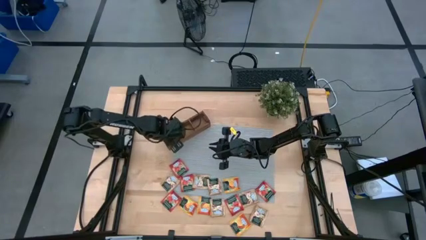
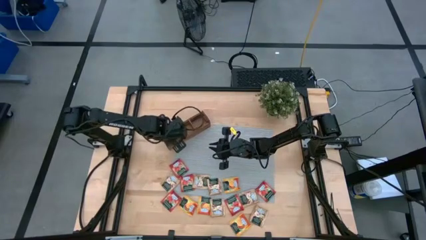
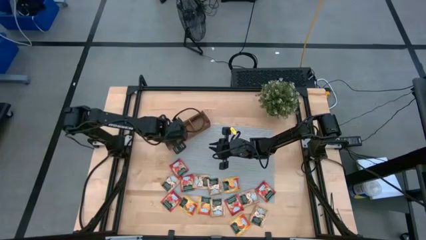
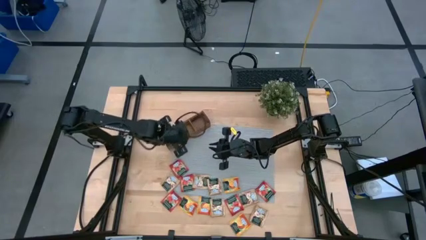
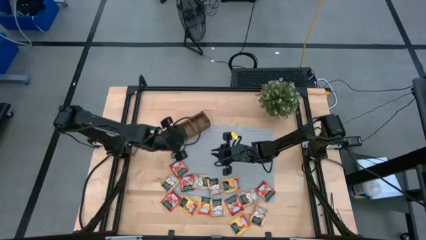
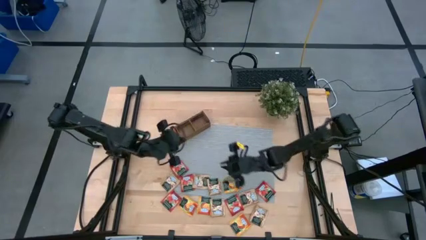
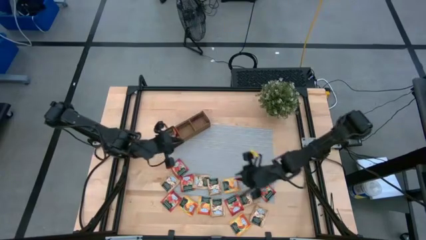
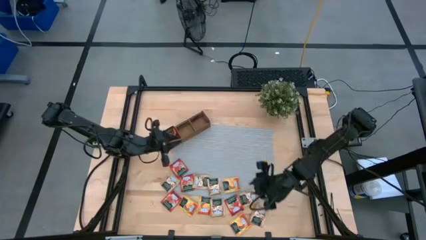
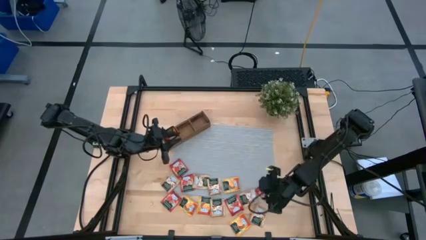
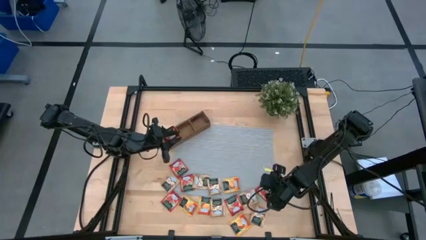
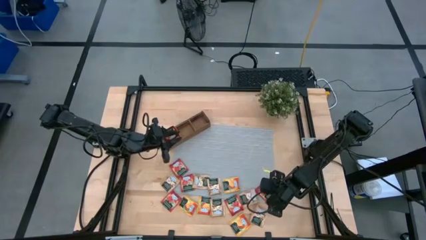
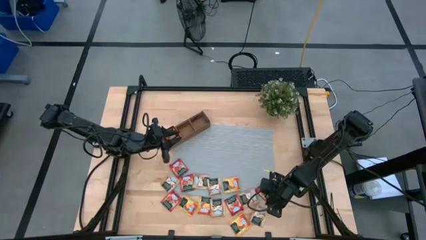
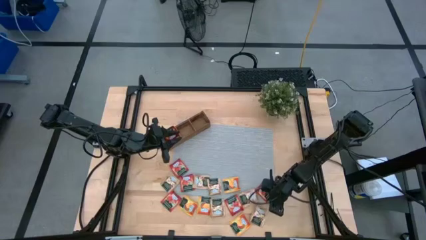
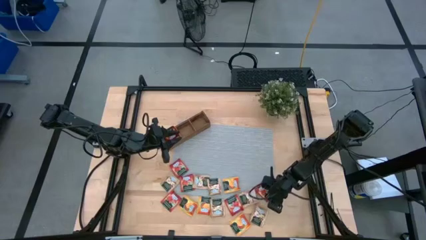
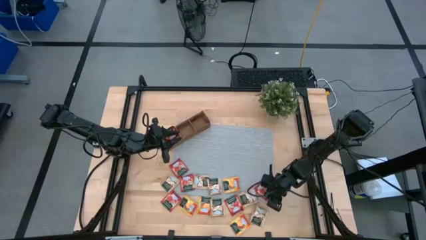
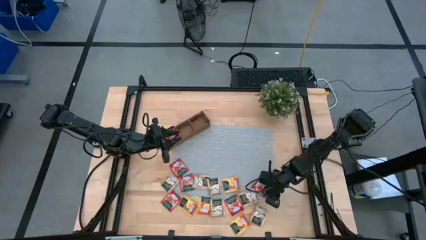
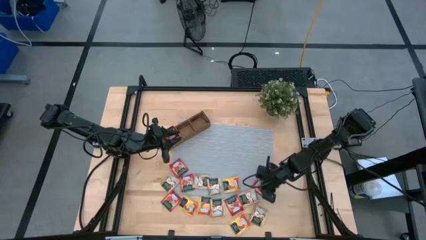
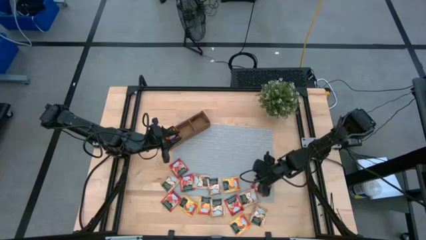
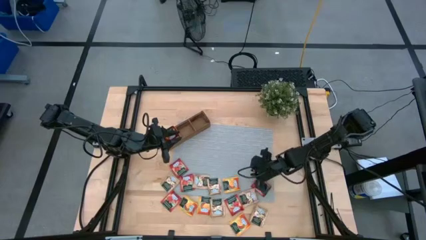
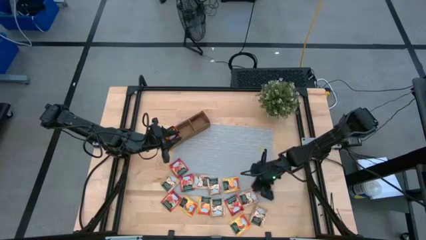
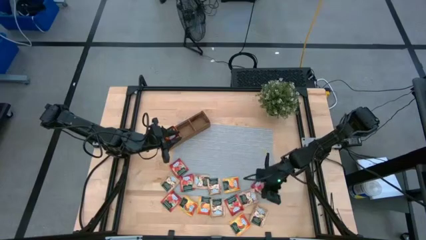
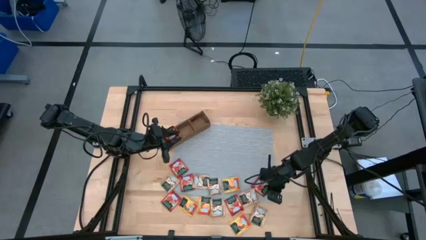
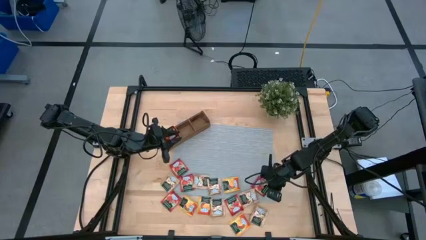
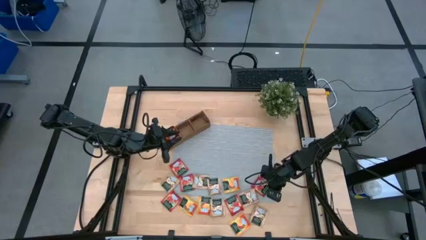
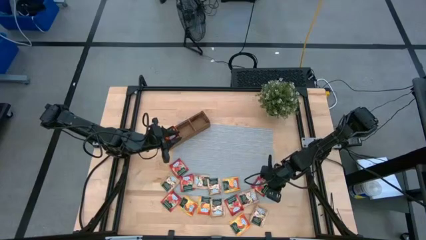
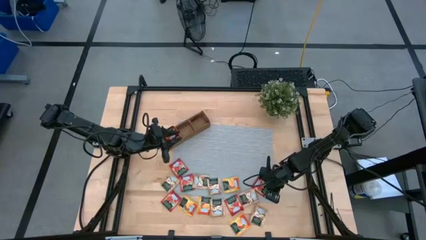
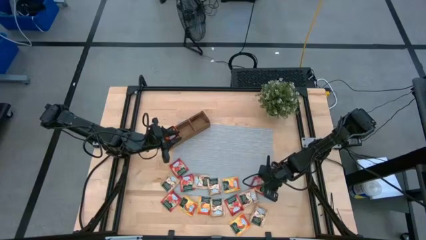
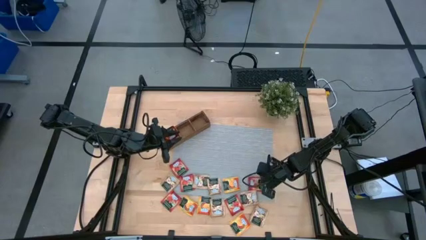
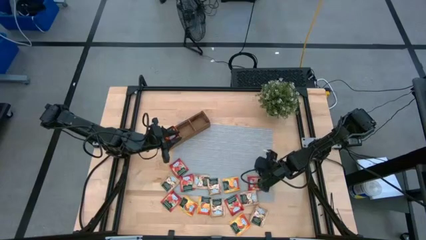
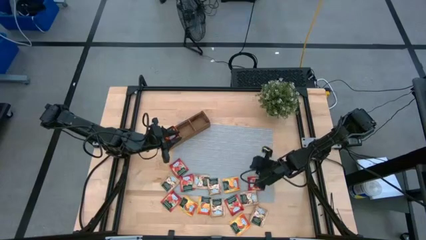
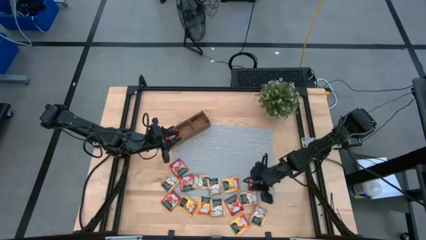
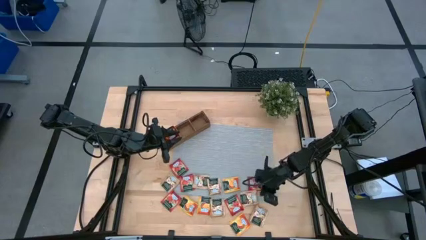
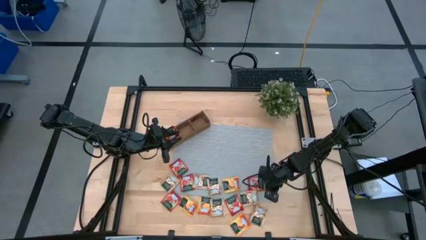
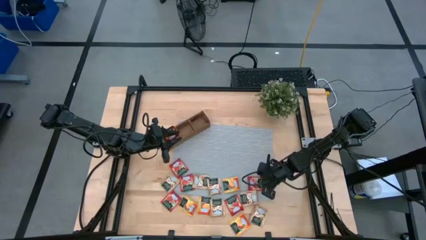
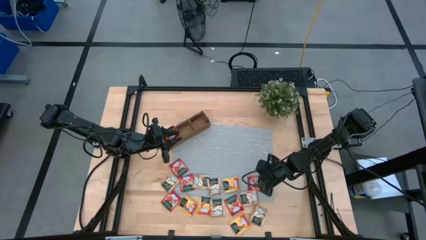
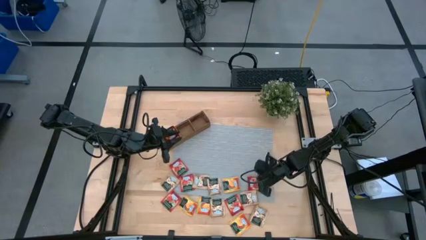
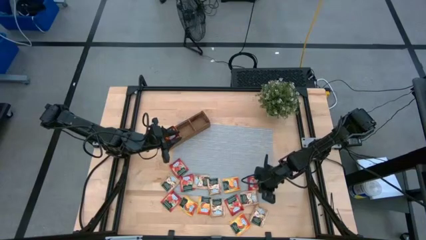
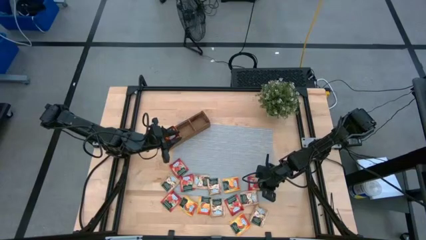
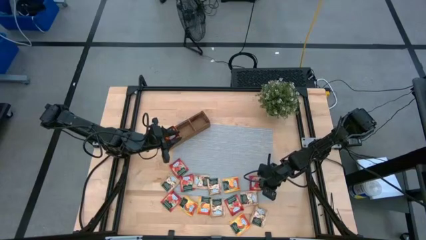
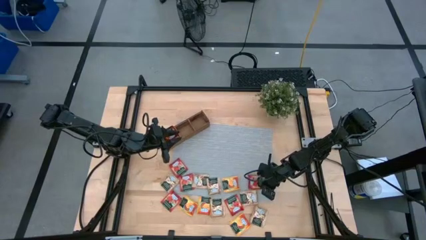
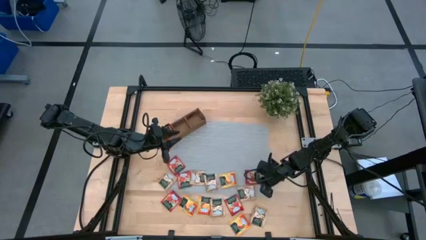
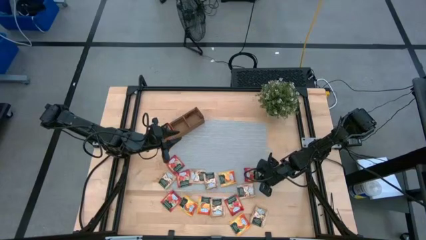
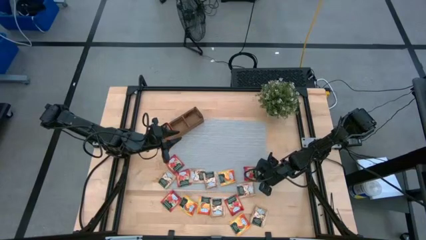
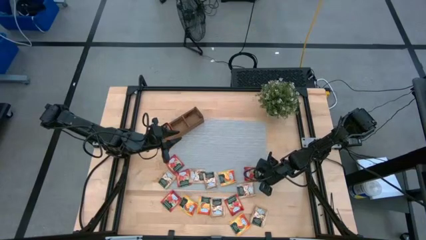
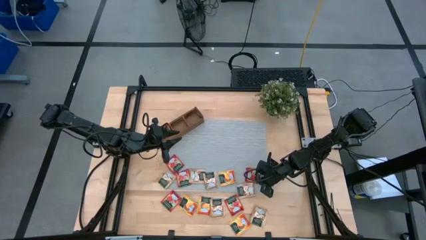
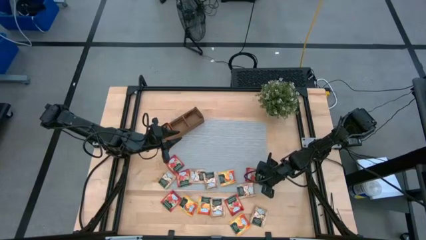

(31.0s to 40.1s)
Task: Pick & Place Tea
Adjust the red tea bag on the table

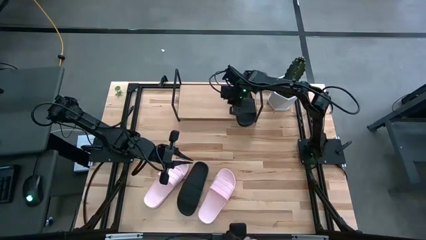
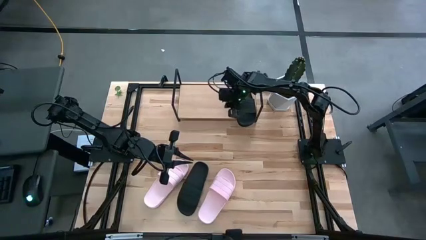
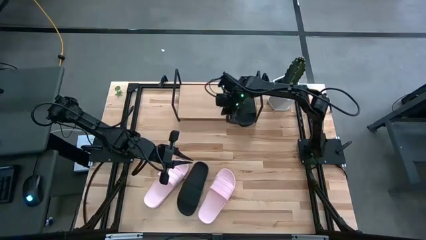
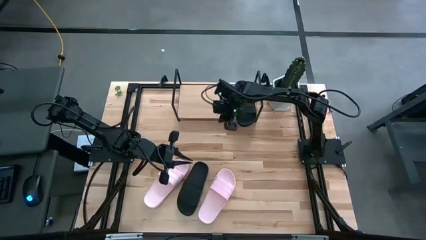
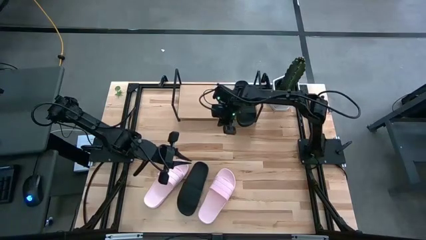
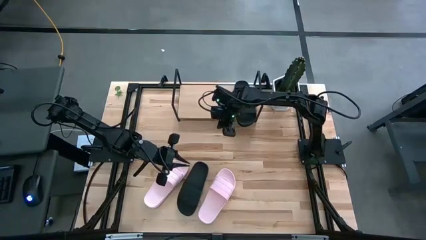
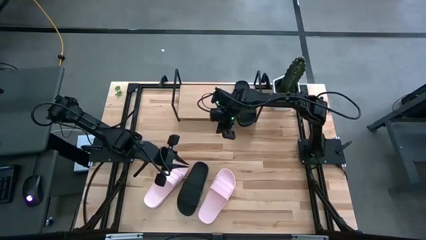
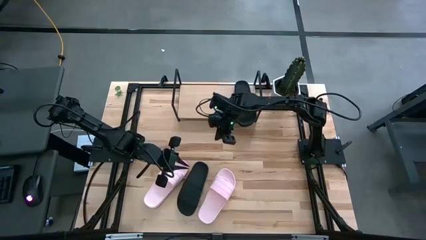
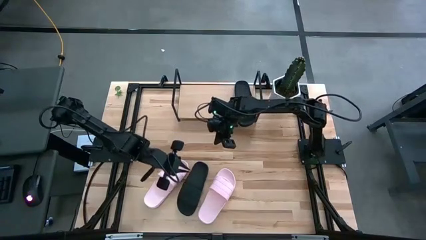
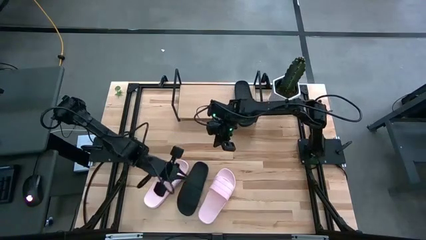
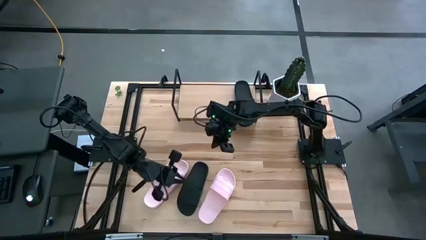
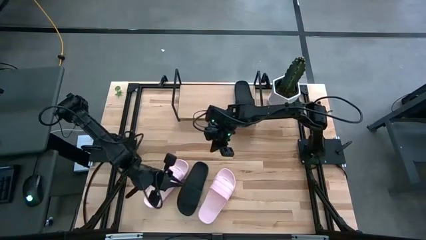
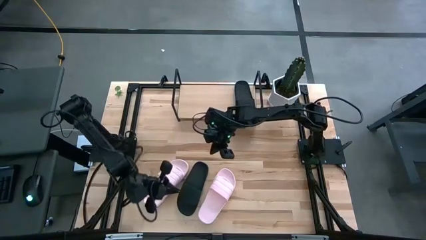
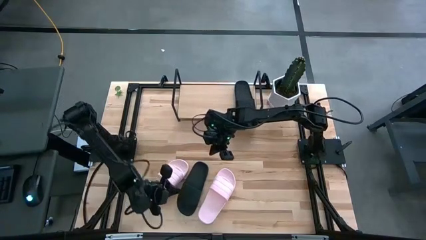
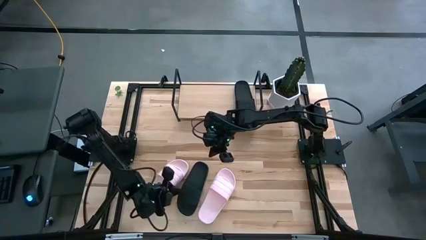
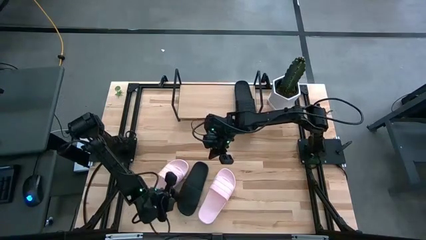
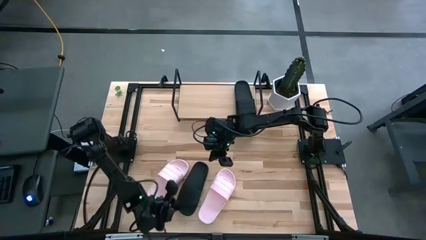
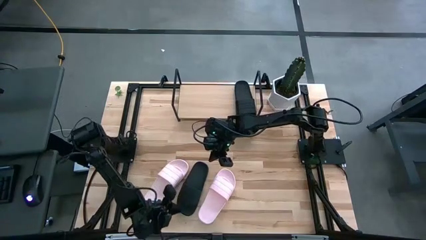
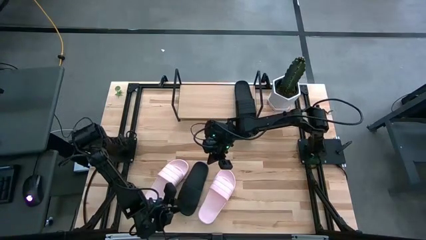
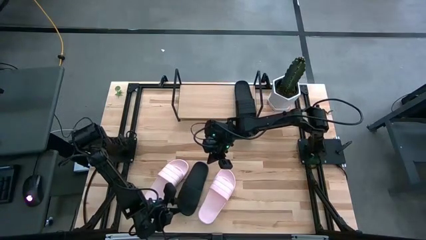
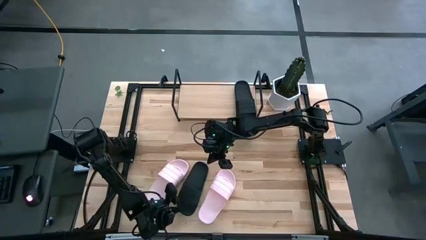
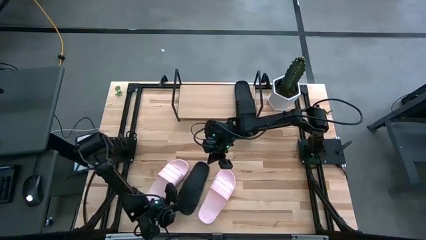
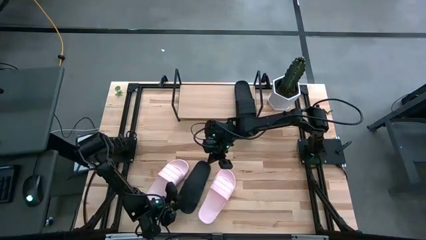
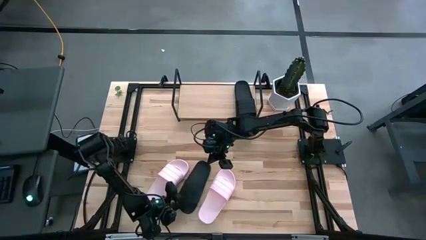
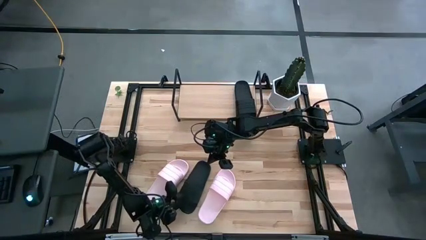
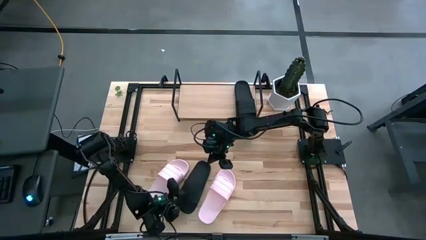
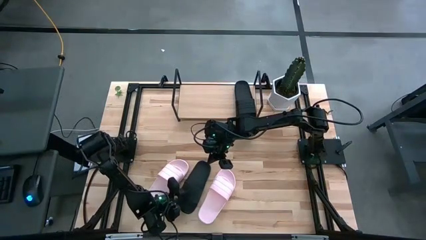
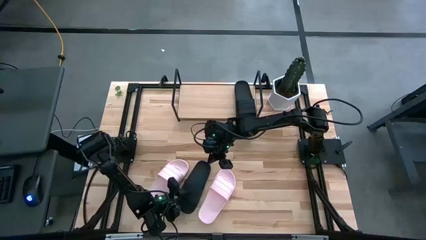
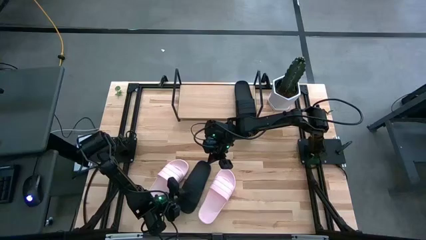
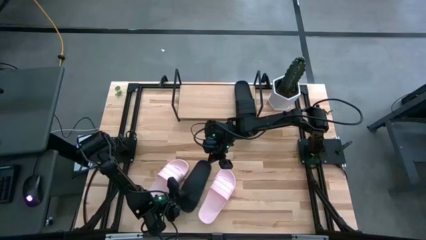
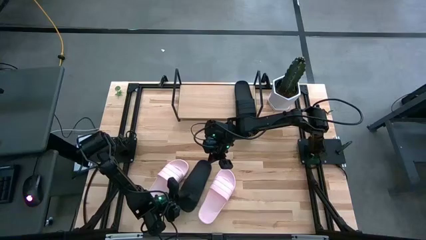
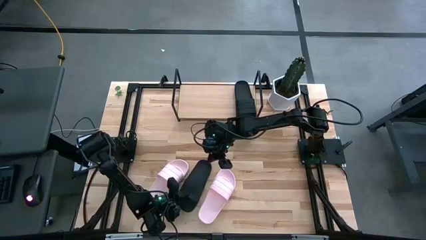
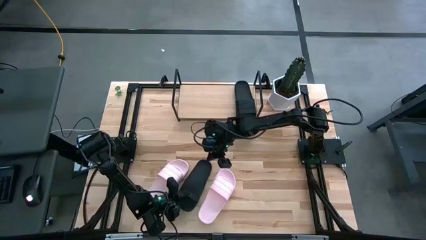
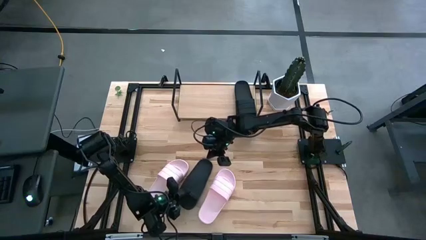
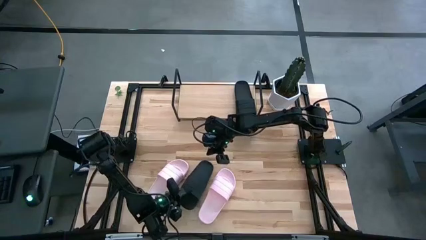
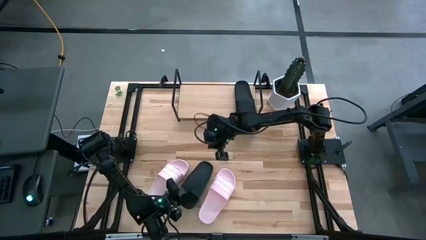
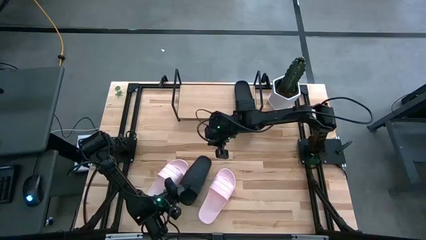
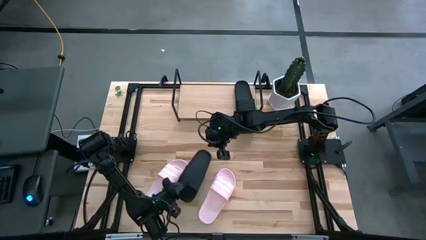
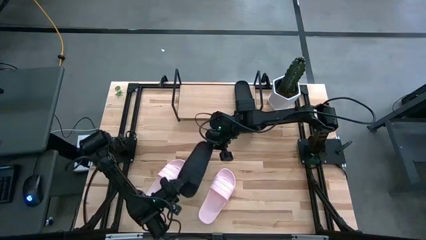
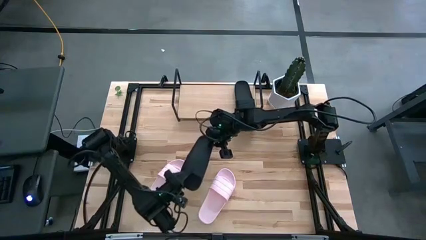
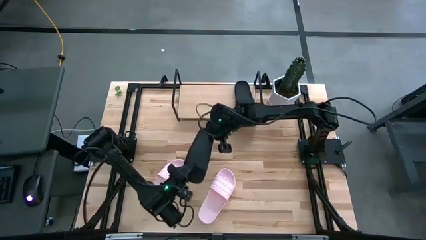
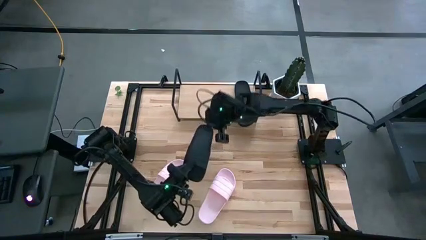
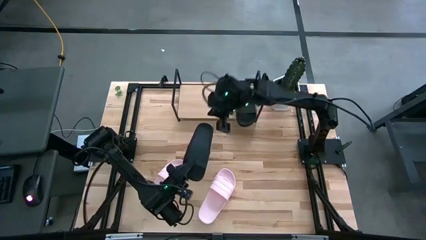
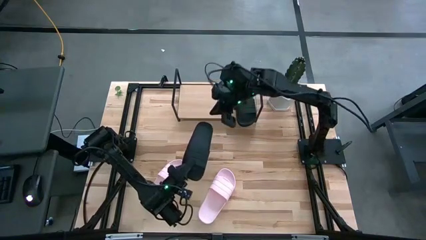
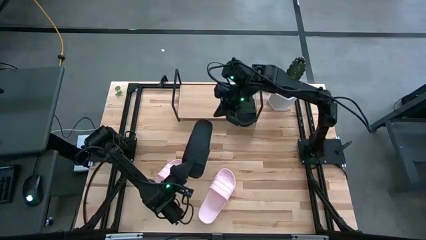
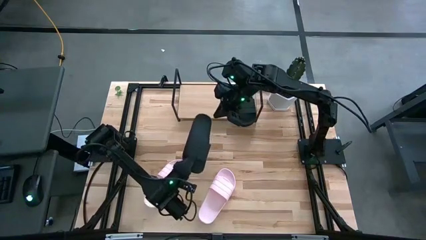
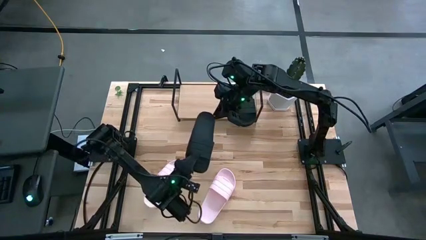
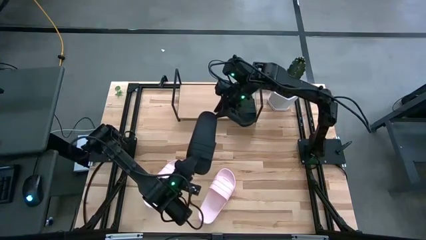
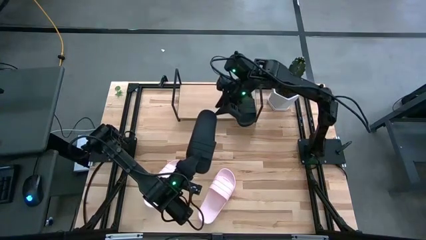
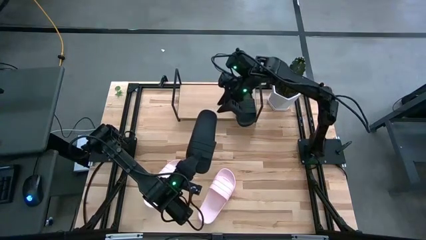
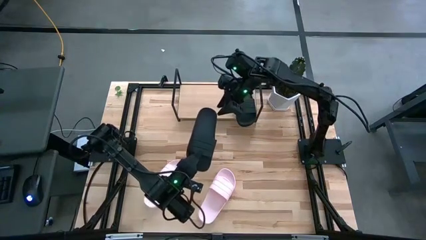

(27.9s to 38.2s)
Task: Pick and place slides into the shelf
Put the black slide on the shelf
